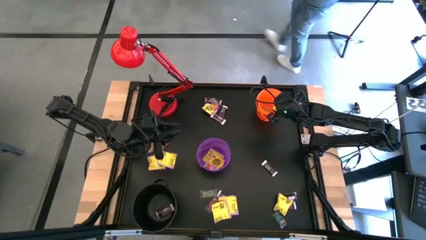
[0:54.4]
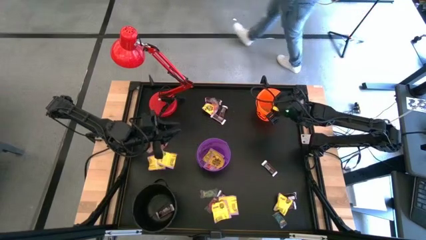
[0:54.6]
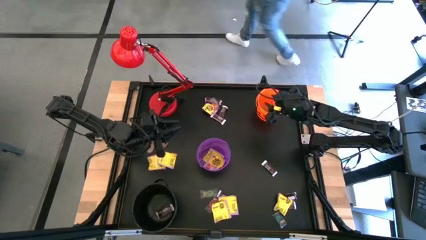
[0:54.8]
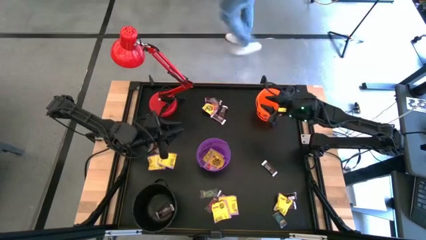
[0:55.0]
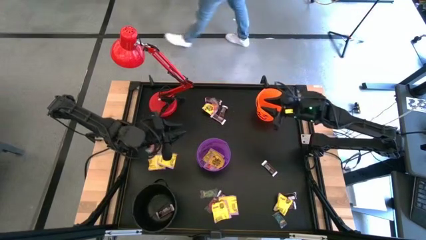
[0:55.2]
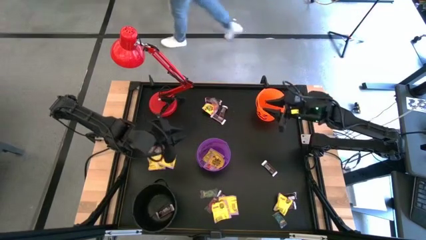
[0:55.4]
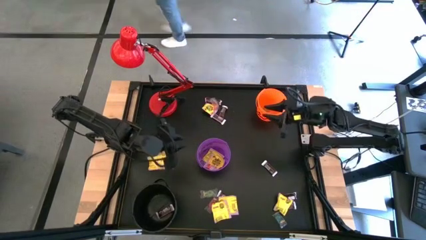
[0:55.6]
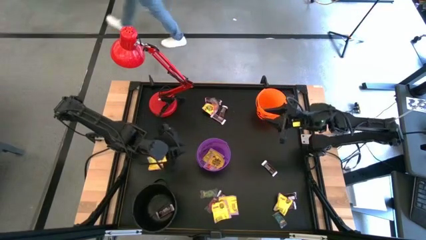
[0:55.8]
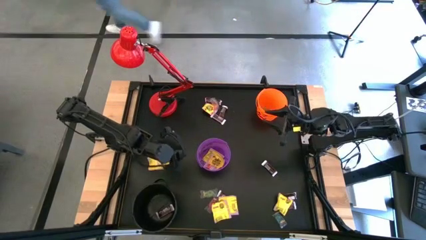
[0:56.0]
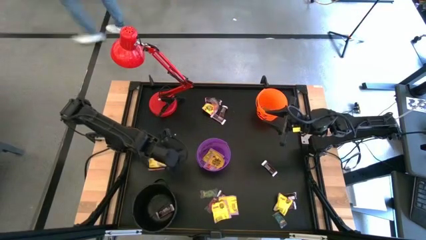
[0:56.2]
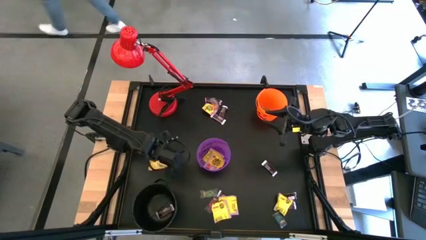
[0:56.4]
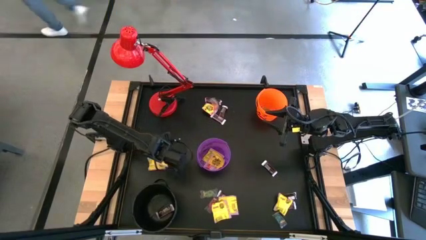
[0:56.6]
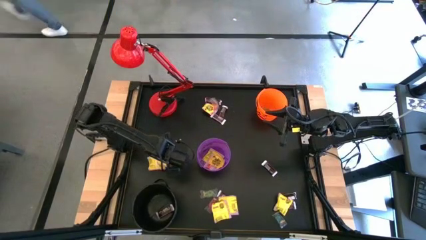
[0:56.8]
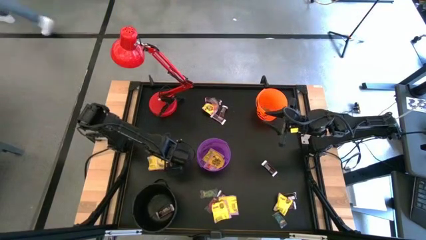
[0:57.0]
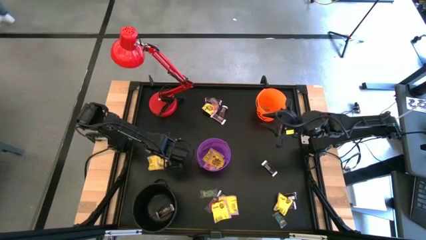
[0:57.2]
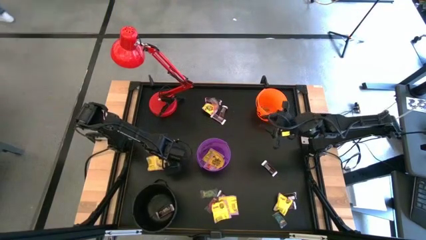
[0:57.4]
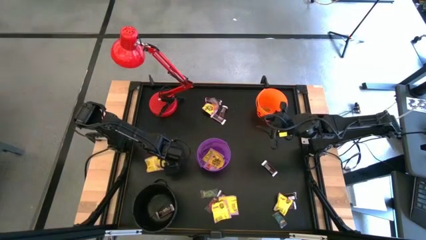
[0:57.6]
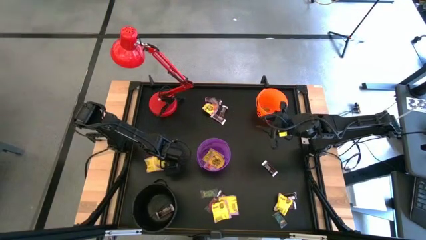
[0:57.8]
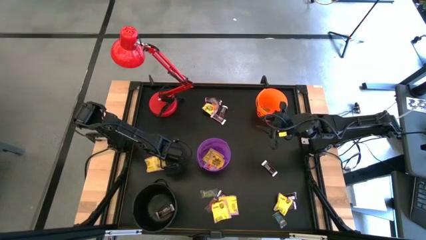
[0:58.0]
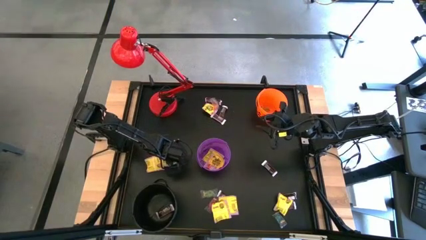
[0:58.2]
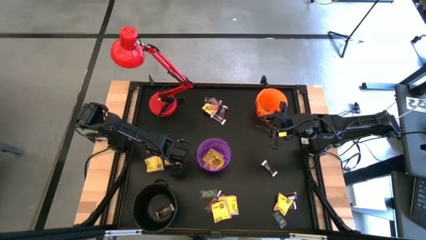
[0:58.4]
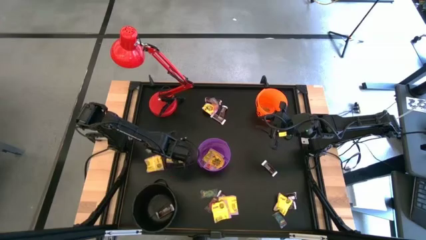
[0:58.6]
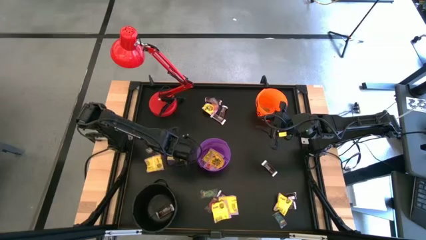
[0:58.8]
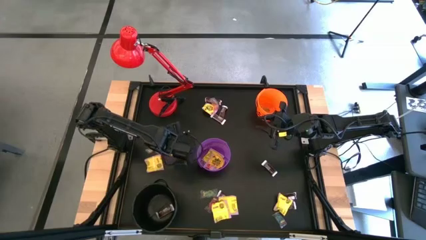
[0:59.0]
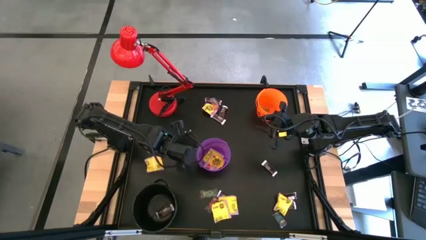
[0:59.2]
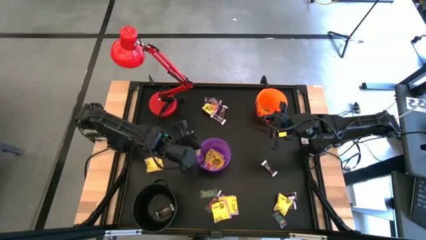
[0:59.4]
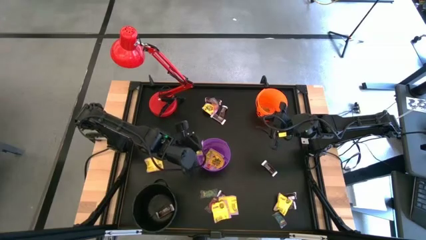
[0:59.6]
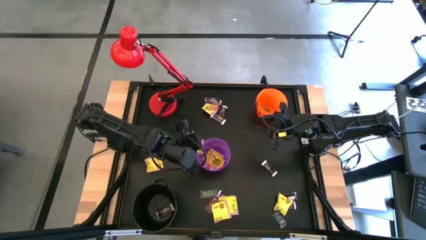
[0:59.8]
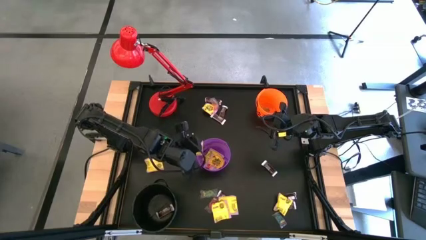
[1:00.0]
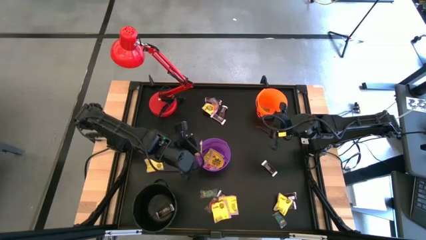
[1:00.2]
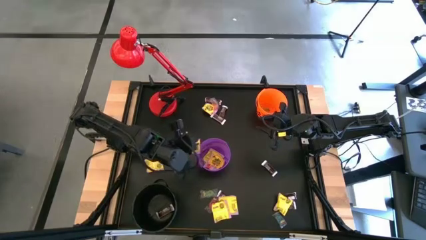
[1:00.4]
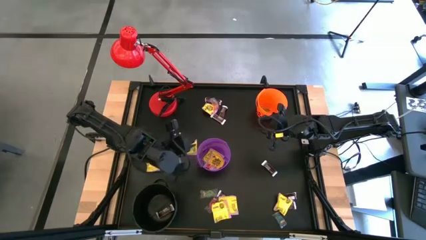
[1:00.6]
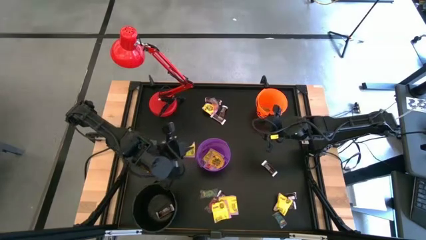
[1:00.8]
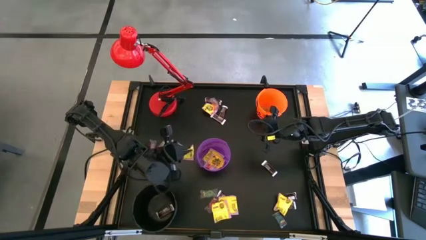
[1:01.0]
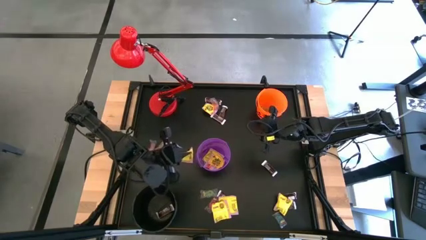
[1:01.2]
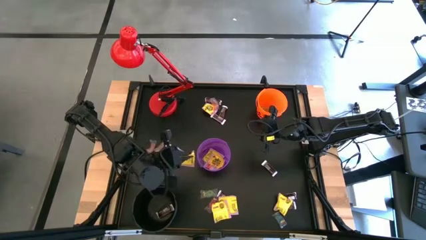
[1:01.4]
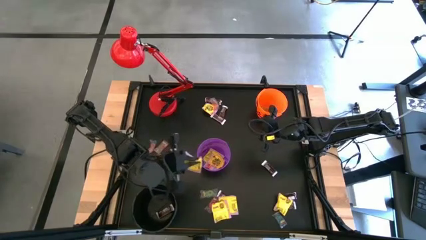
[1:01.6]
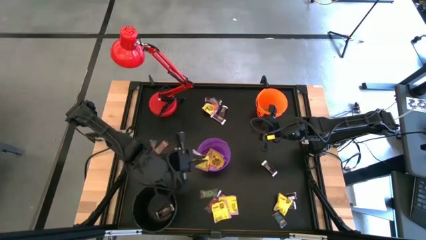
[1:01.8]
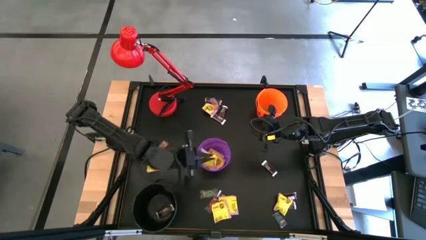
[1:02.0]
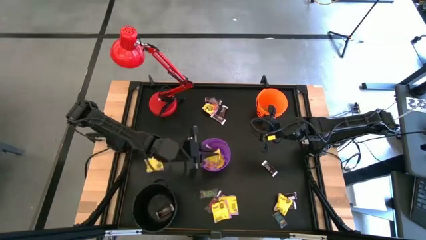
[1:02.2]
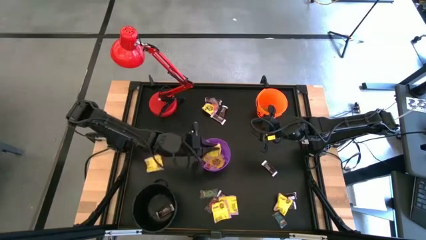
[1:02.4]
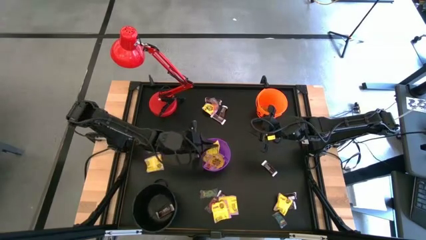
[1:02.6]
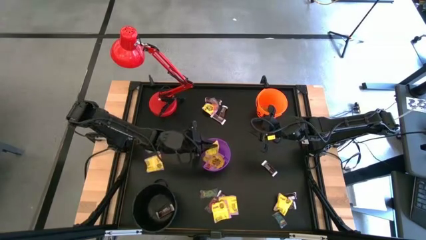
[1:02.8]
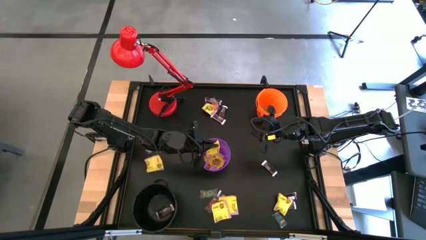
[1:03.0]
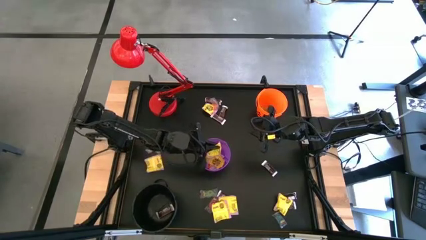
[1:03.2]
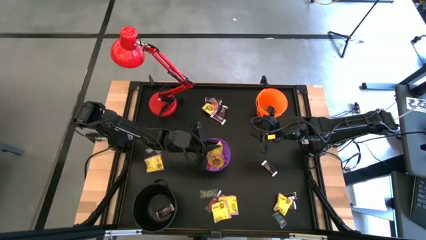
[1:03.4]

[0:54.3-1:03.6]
Task: Sort candy
Put the yellow candy into the purple bucket

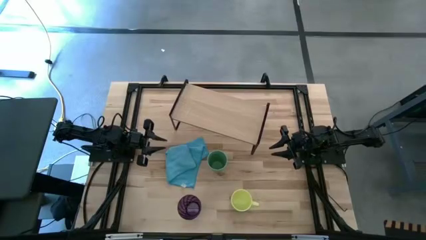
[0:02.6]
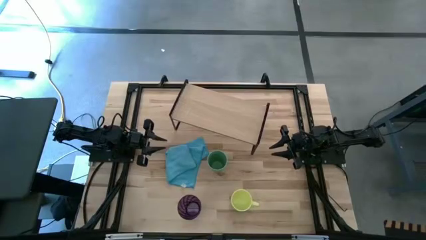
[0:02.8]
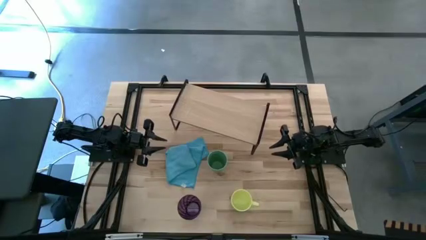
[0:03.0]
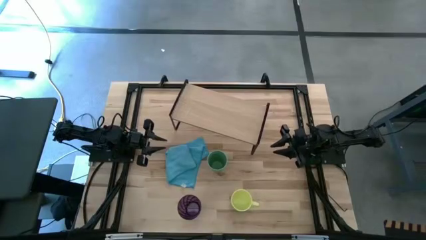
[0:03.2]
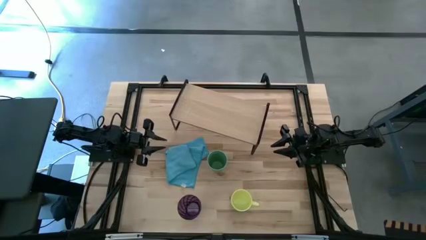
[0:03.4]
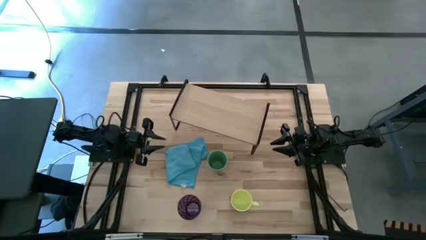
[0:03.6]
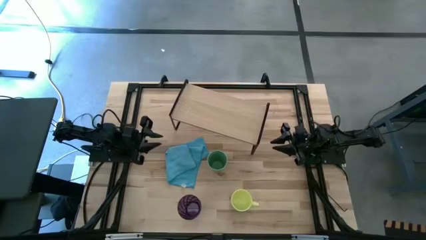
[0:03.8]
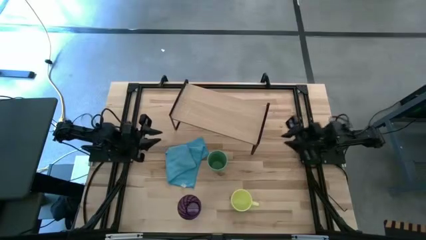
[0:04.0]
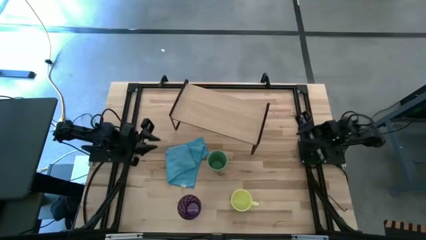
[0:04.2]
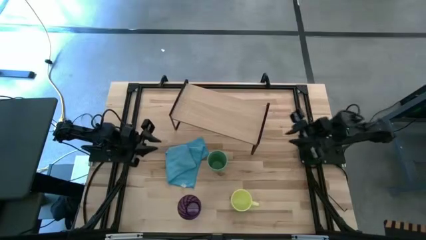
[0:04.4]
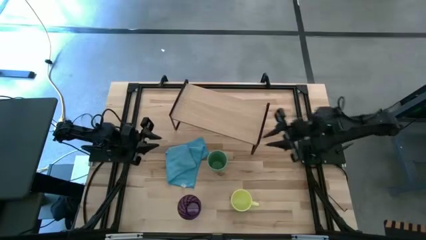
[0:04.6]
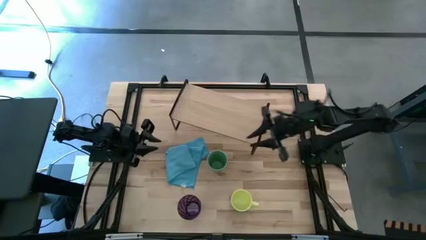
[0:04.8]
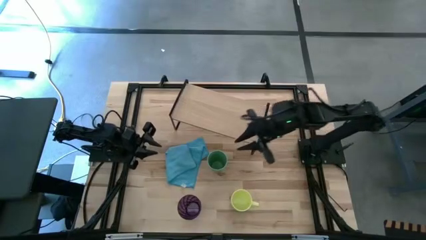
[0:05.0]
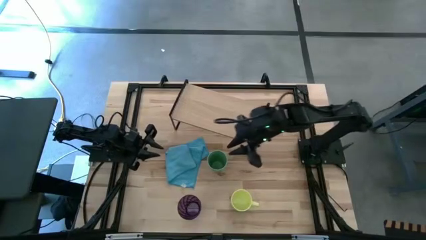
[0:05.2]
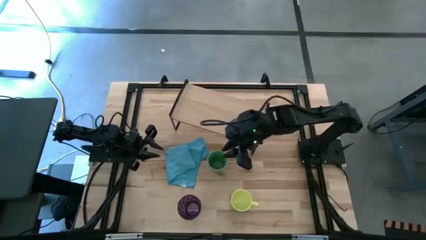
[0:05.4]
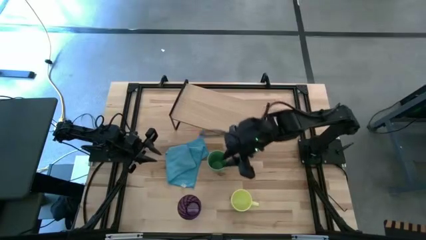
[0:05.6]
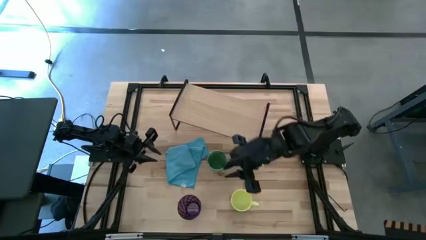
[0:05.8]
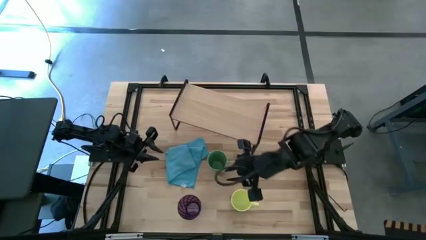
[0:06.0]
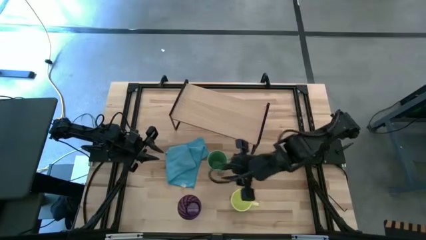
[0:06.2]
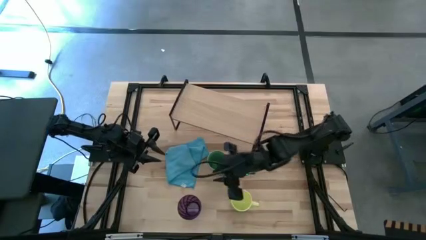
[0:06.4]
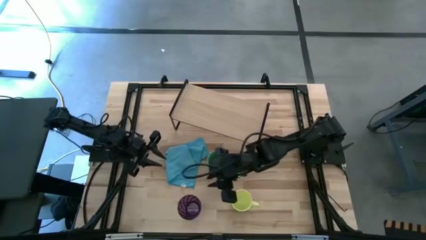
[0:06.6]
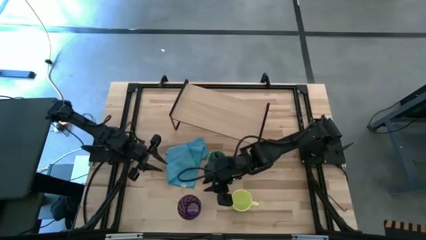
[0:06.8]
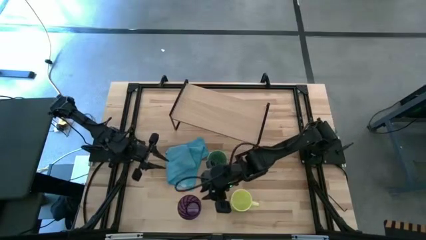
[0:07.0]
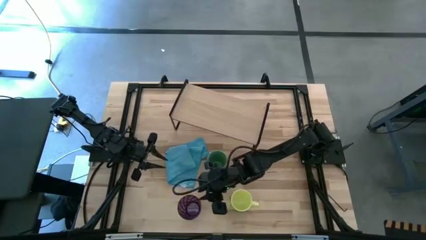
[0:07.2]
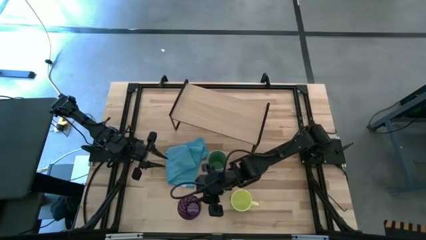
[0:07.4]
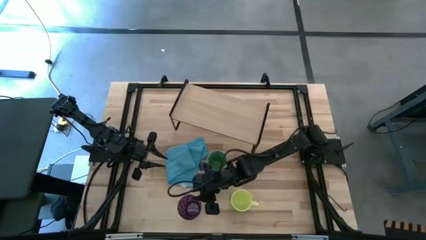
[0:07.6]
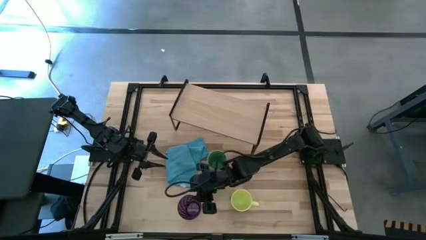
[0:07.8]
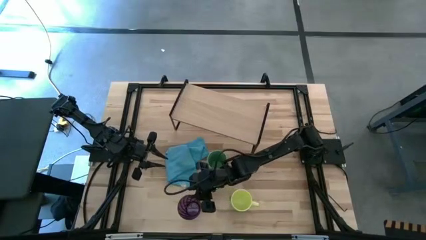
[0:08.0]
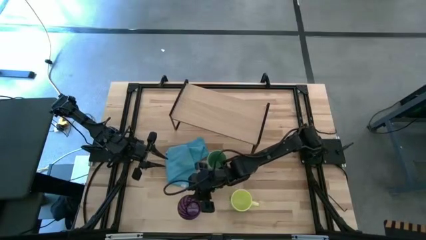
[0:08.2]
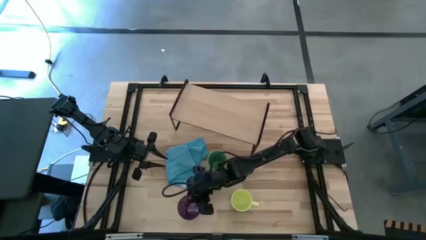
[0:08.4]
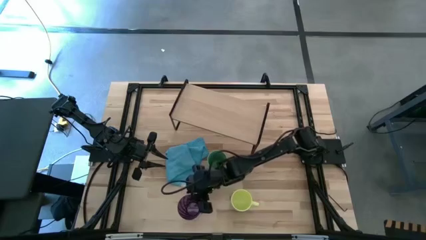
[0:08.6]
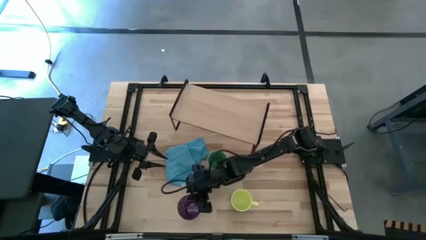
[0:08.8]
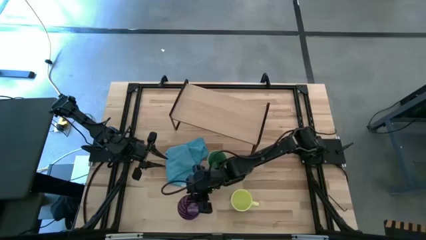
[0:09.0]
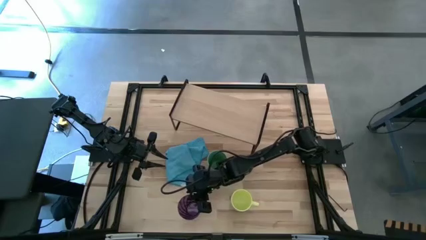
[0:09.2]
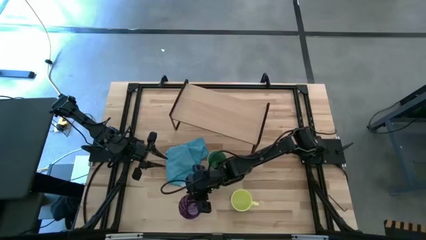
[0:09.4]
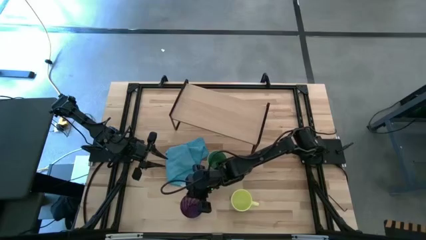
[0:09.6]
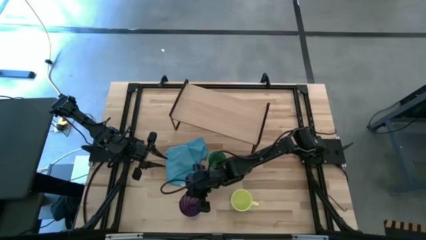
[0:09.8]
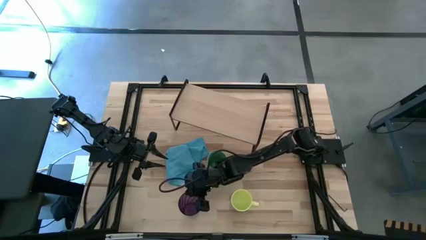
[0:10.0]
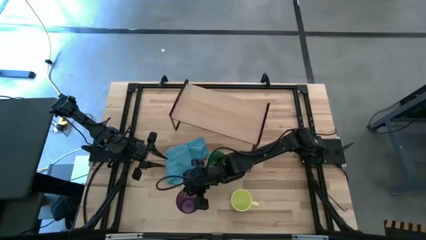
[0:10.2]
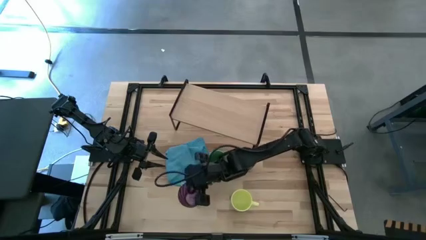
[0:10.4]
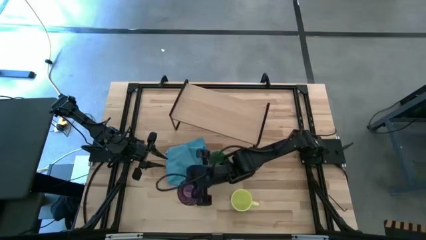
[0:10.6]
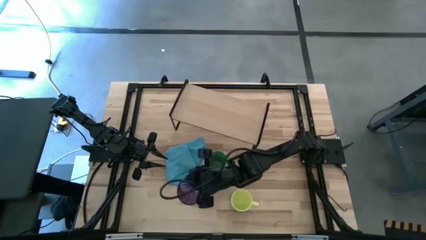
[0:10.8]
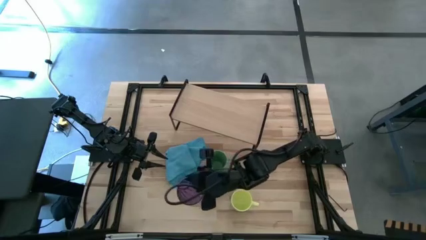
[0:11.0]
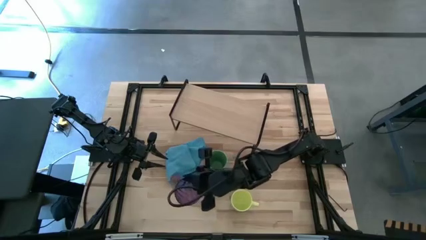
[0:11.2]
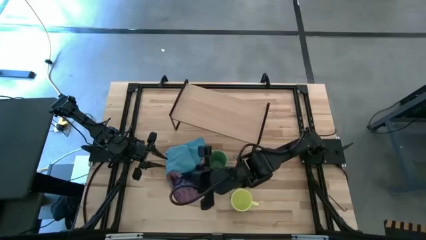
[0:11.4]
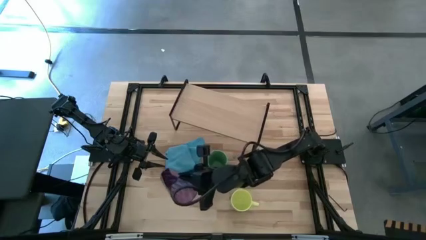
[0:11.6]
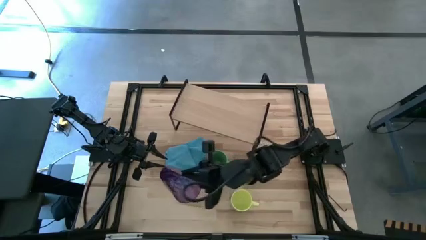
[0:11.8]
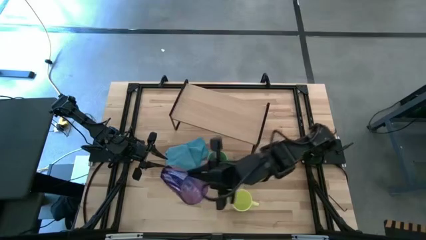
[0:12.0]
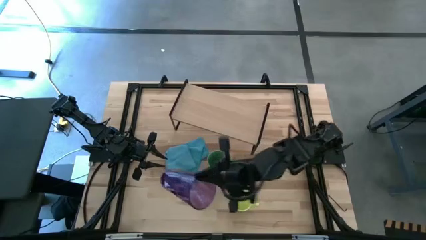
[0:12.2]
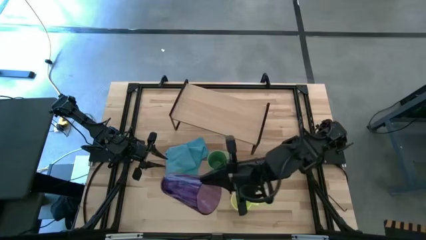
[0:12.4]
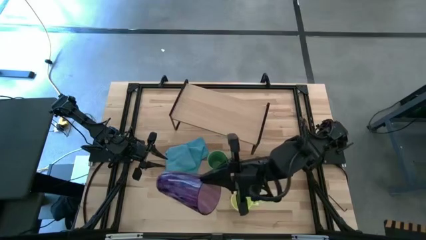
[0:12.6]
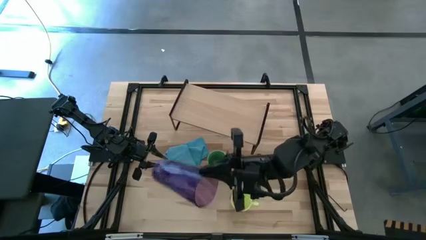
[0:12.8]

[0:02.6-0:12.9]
Task: Stack small to large cups/mugs on shelf
Put the purple cup on the shelf
